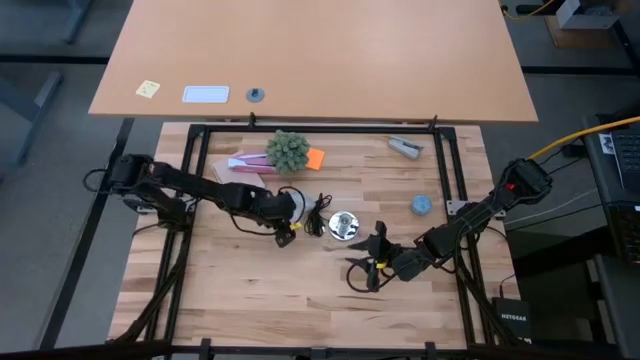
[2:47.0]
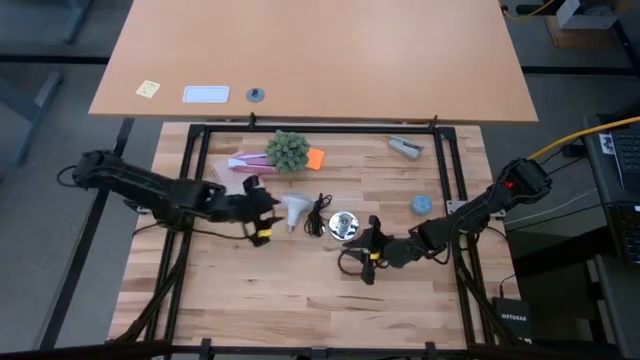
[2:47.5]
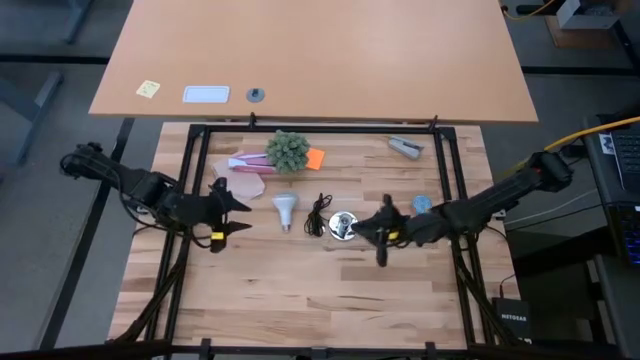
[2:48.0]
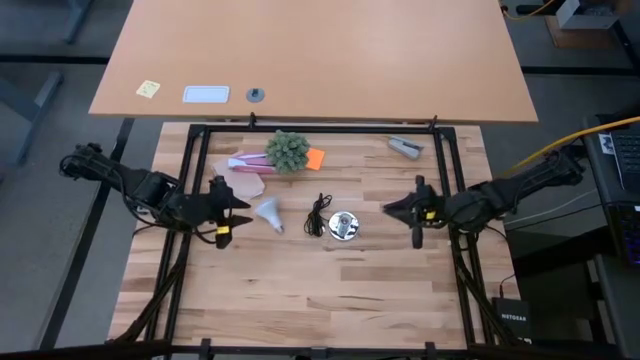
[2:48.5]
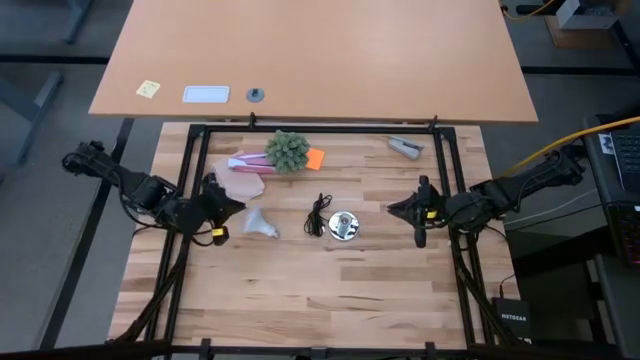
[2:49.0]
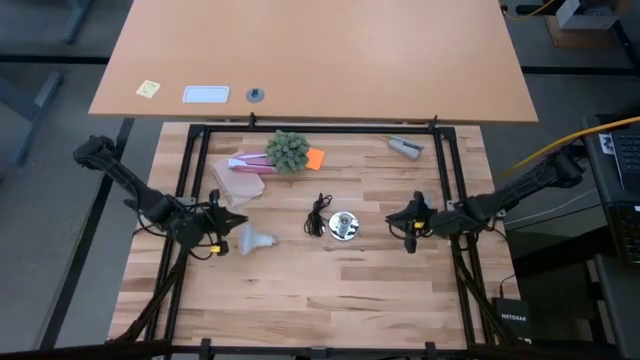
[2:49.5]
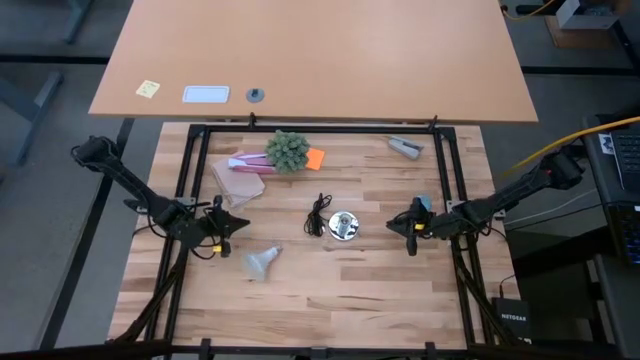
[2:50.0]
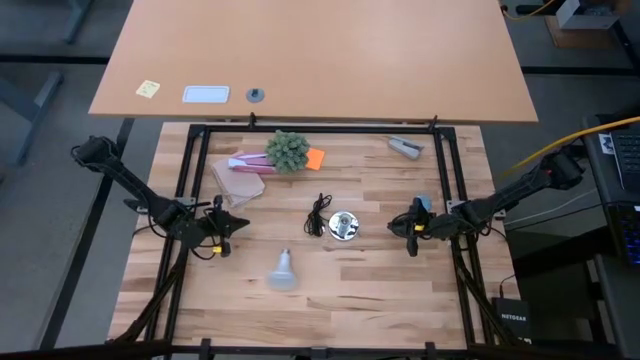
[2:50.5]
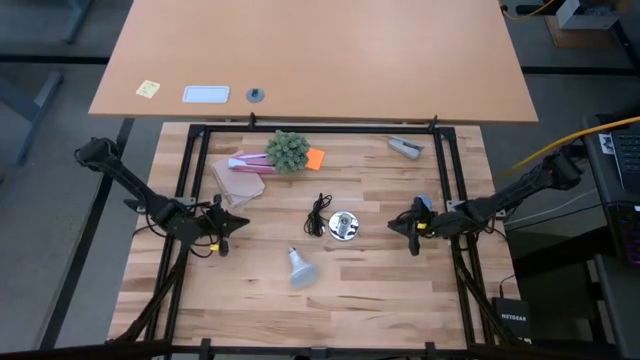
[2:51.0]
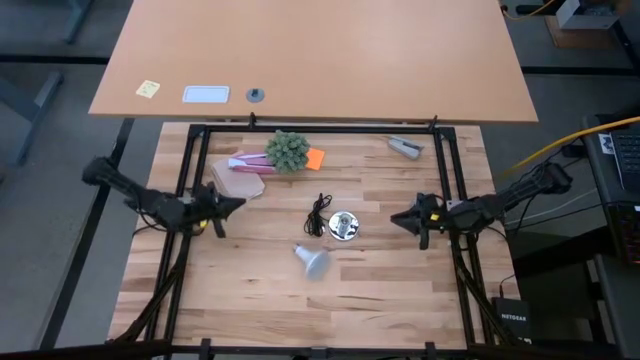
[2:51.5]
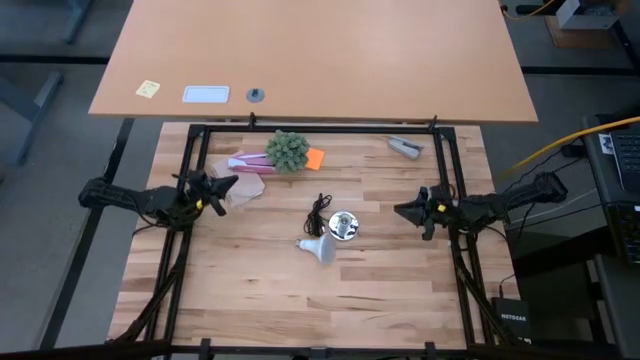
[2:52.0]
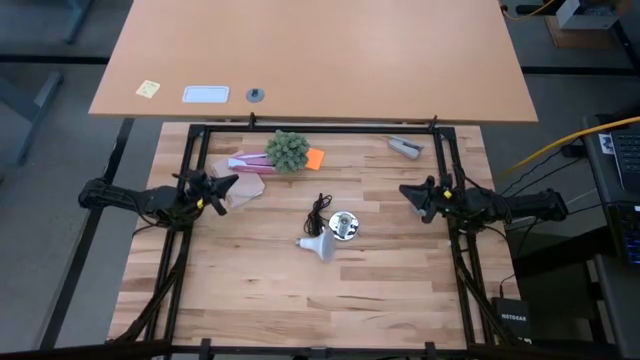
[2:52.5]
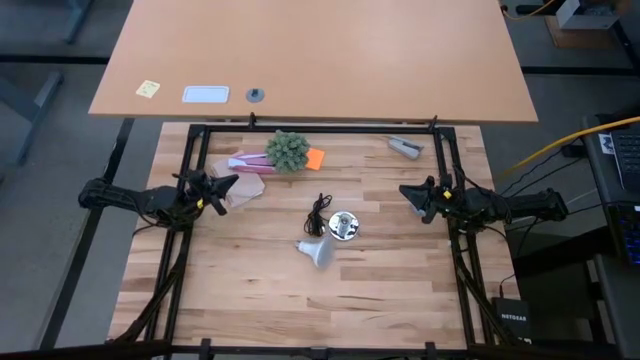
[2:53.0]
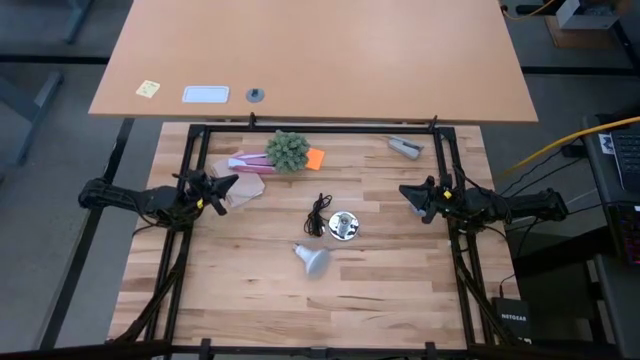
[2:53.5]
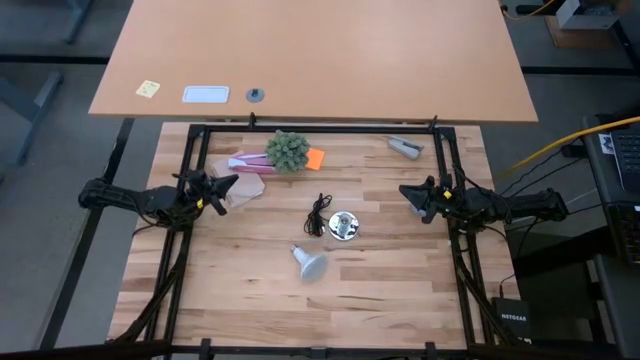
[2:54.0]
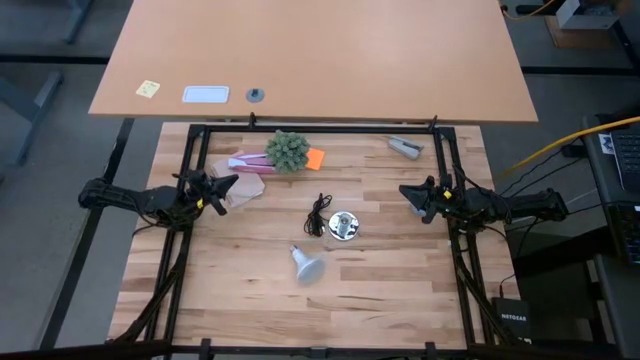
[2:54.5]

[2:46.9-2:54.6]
Task: Screw lightbulb
Return to Home Position

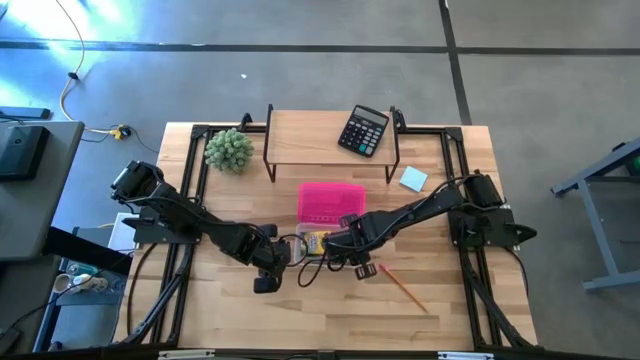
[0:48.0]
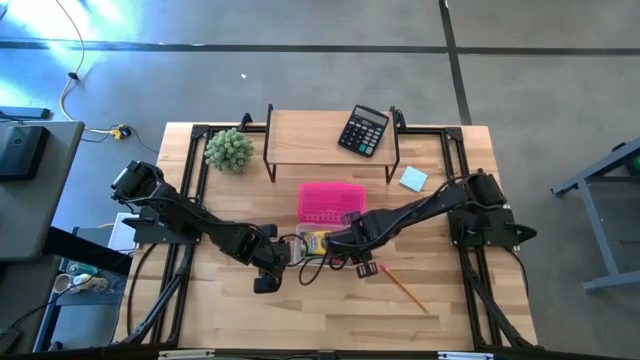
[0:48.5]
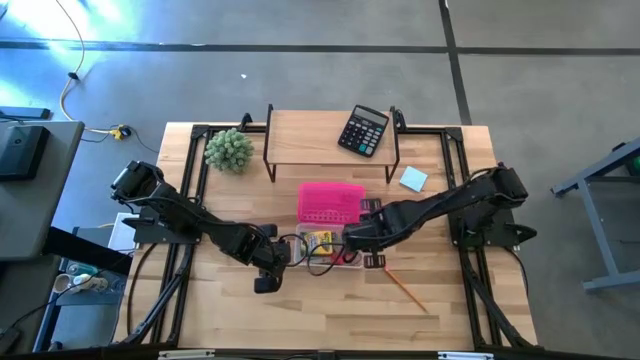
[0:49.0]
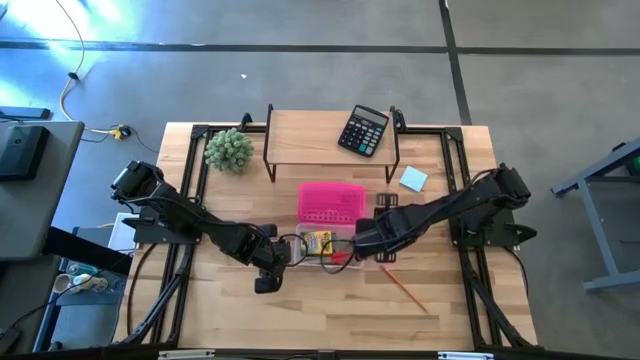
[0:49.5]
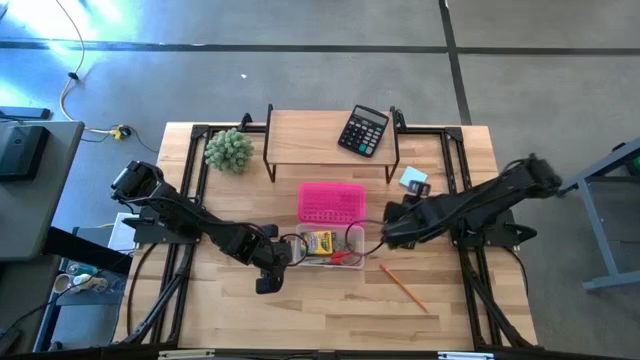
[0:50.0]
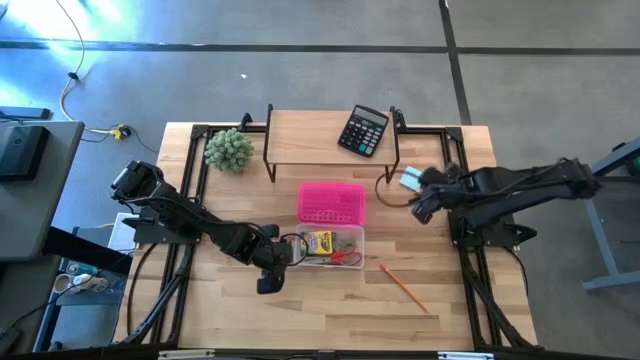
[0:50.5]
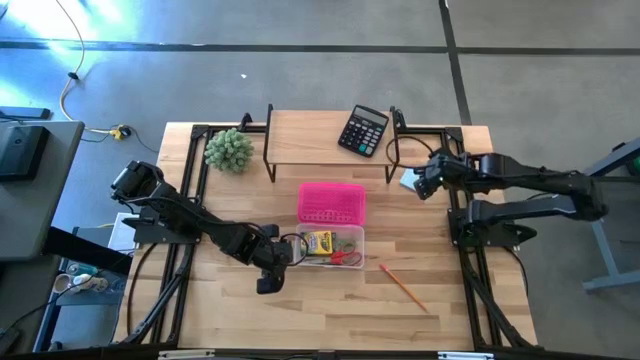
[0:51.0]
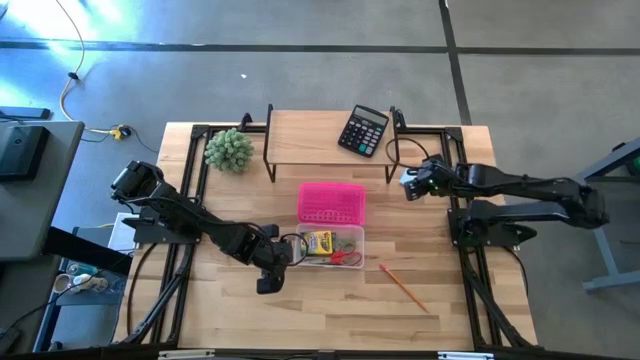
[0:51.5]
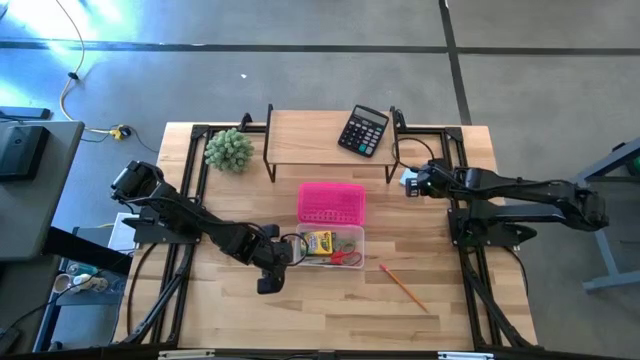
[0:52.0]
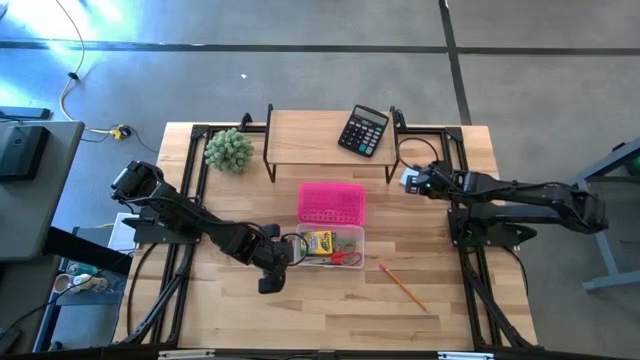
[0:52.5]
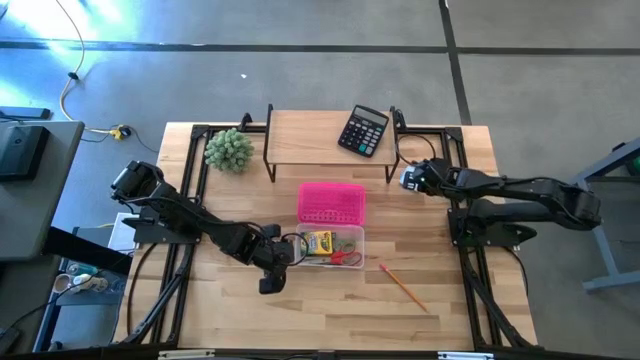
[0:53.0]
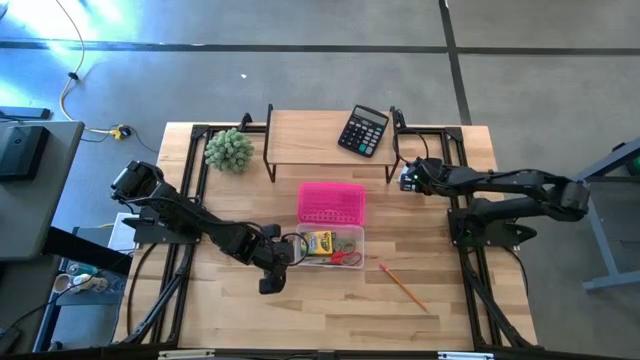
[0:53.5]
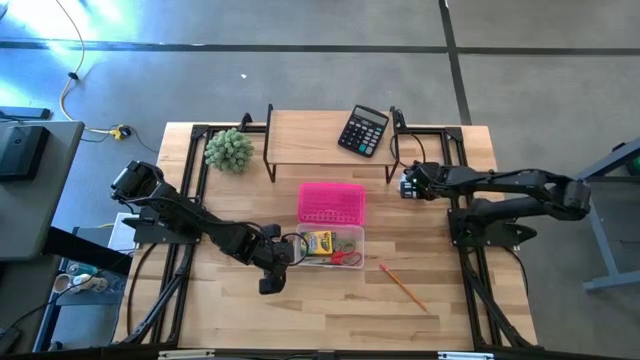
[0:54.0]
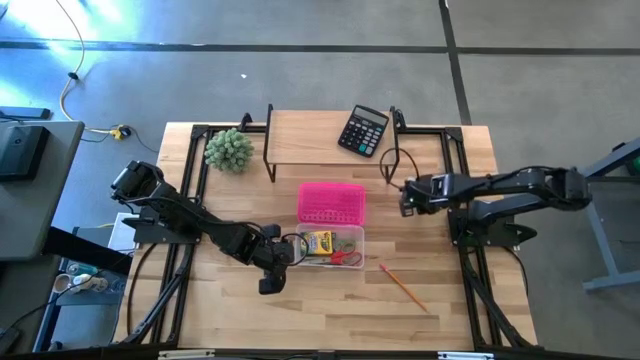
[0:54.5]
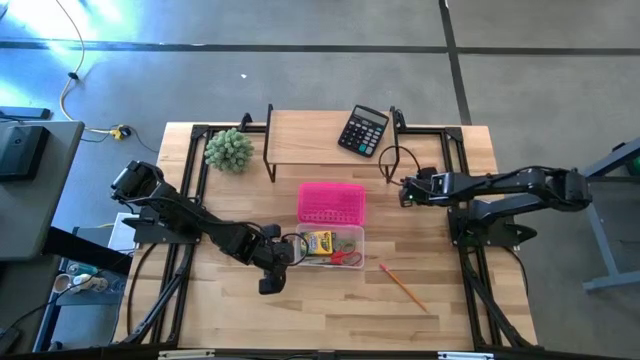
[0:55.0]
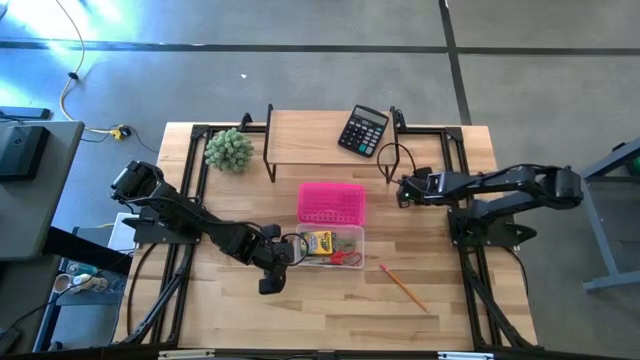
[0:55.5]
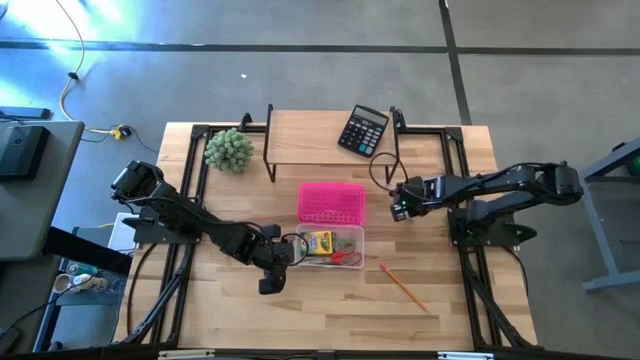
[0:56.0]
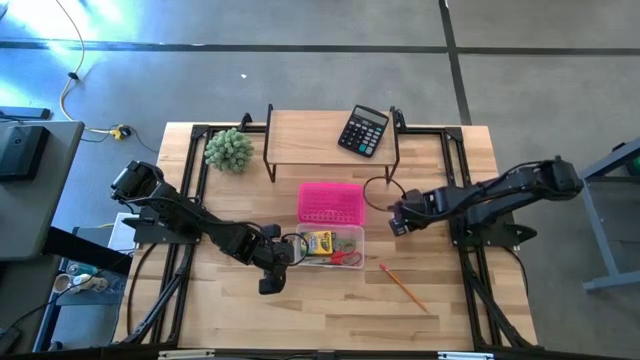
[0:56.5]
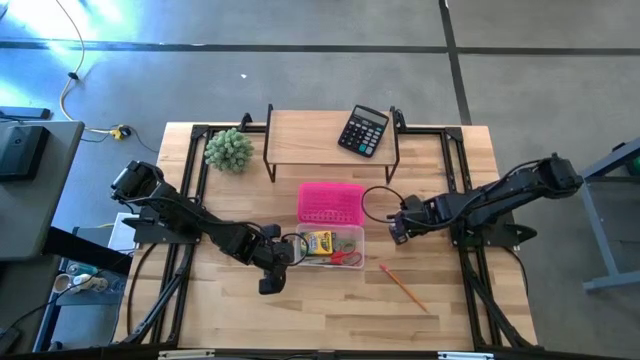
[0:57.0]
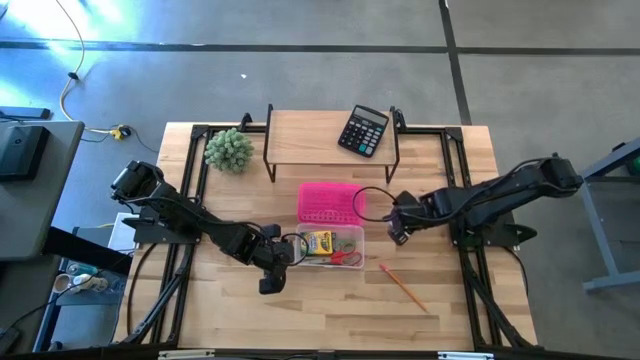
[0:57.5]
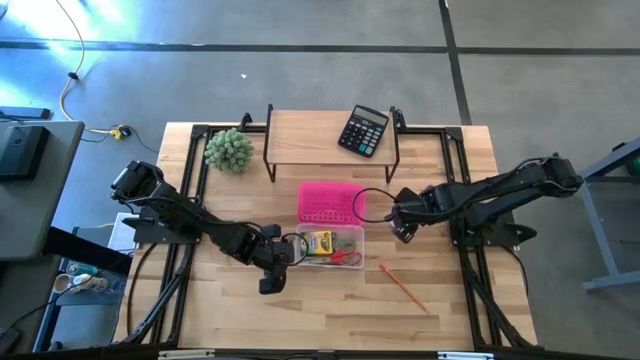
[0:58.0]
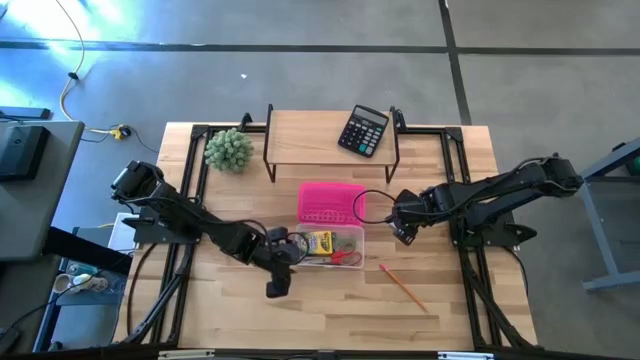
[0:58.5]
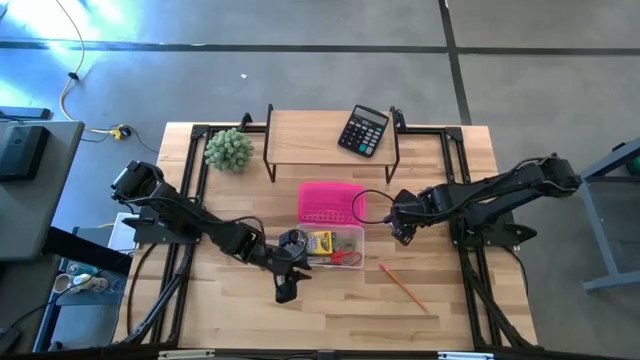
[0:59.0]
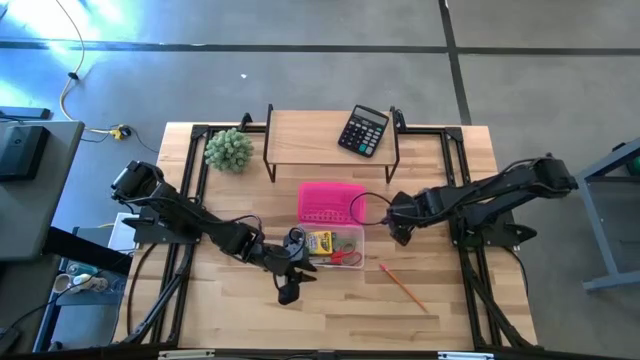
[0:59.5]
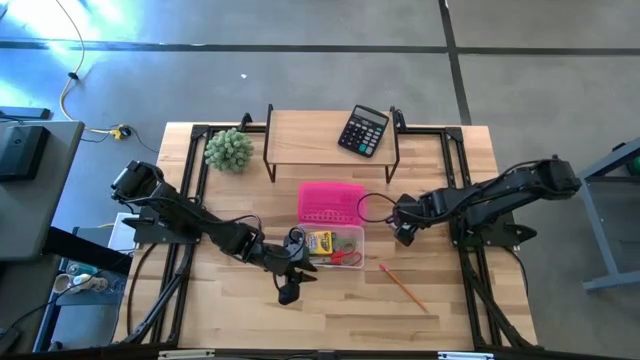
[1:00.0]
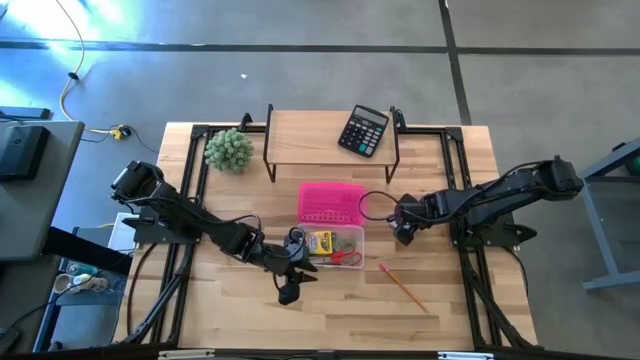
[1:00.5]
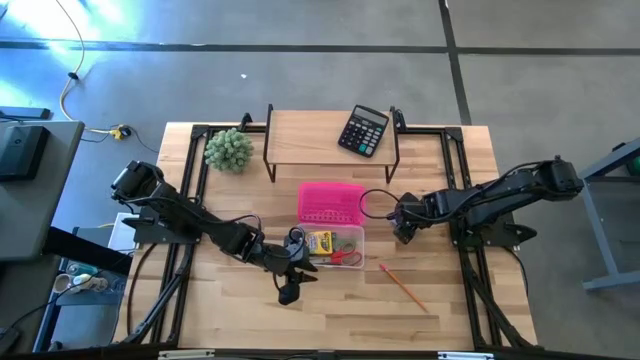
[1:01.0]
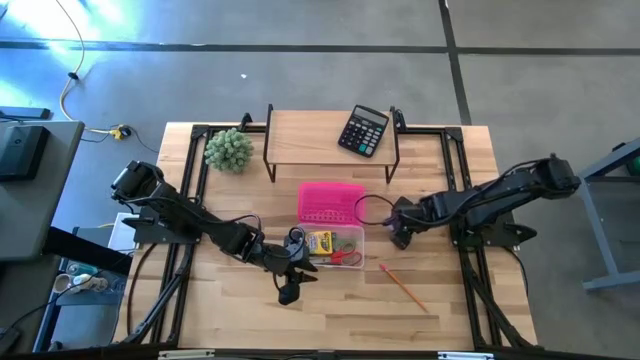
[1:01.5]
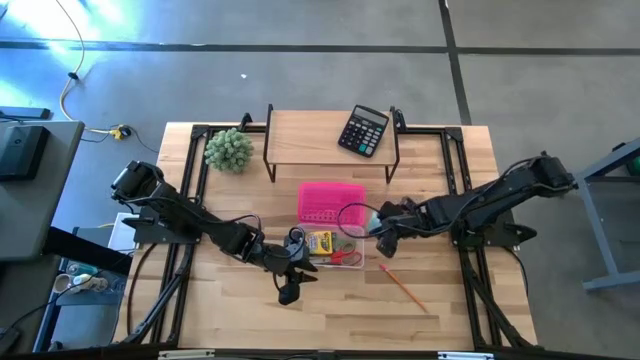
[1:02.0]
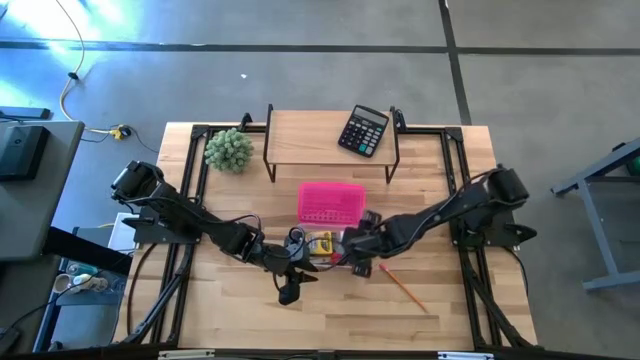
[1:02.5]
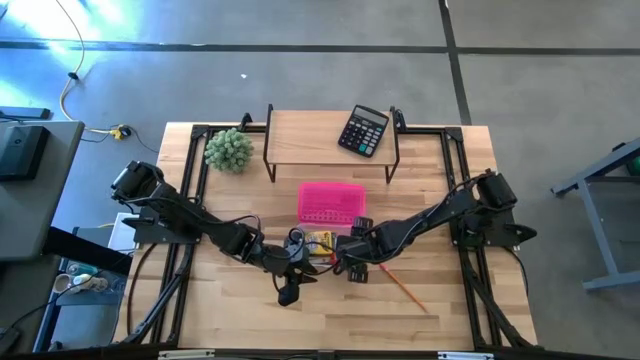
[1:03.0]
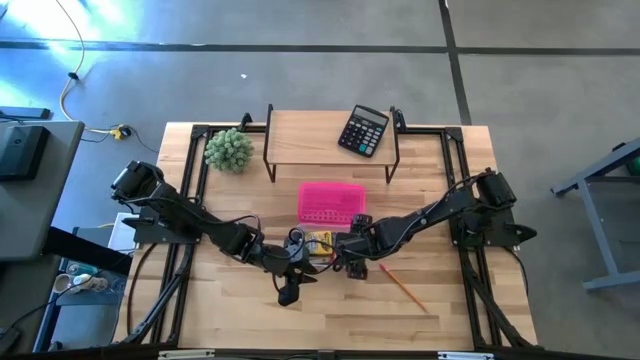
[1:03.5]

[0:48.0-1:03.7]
Task: Pack school essentials
Put the blue sticky note into the pink supply box
